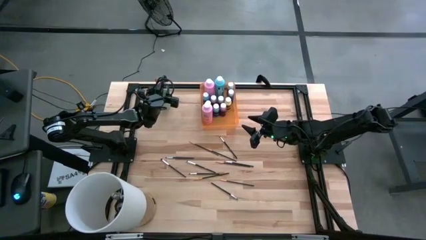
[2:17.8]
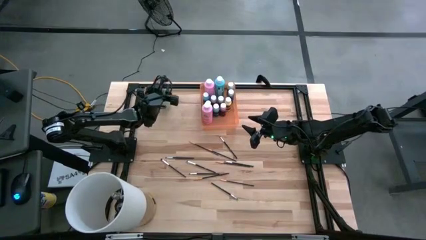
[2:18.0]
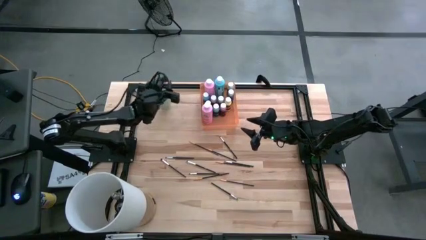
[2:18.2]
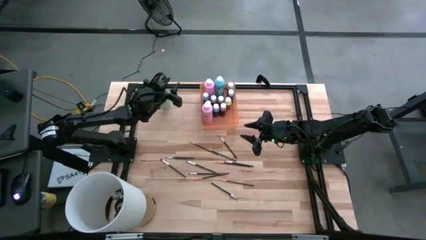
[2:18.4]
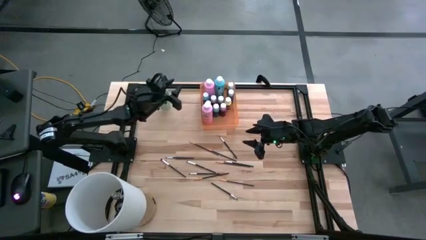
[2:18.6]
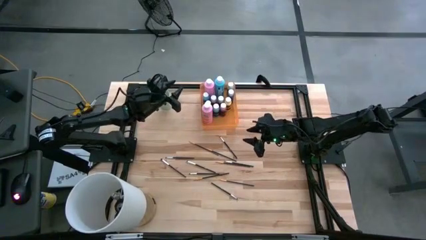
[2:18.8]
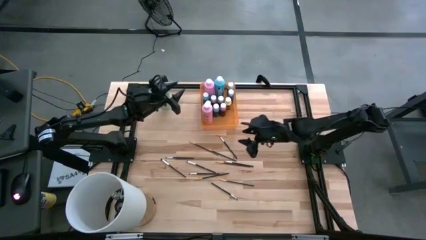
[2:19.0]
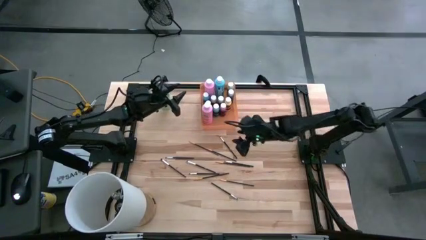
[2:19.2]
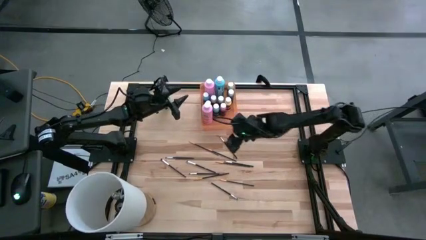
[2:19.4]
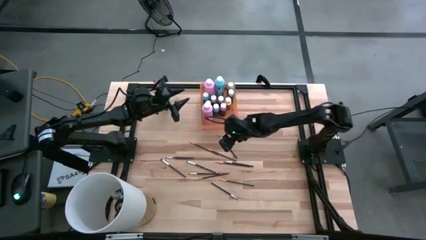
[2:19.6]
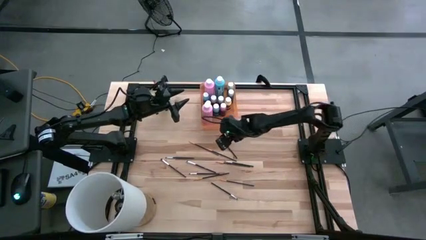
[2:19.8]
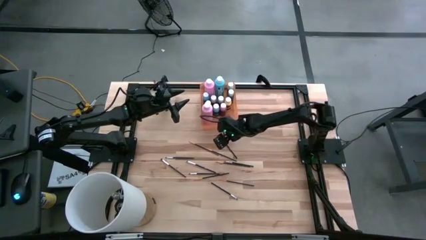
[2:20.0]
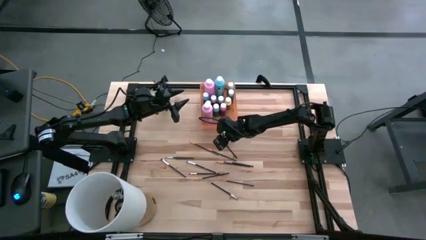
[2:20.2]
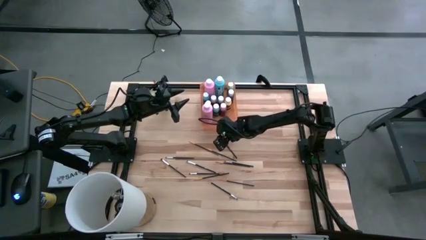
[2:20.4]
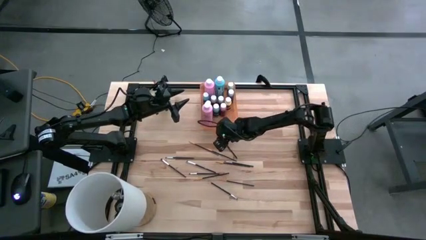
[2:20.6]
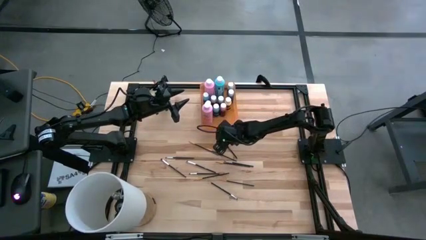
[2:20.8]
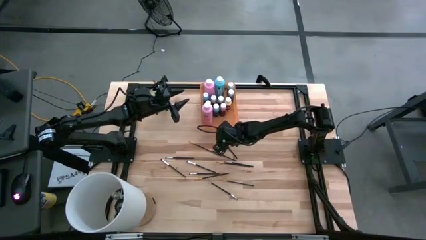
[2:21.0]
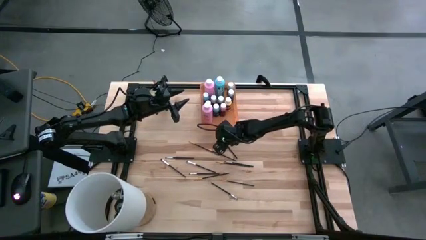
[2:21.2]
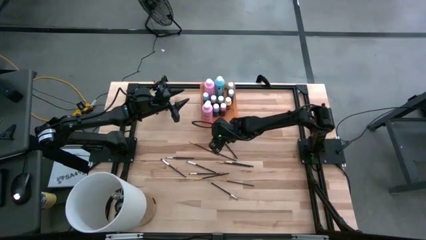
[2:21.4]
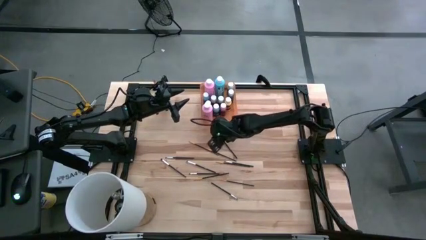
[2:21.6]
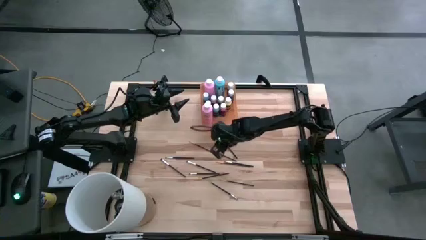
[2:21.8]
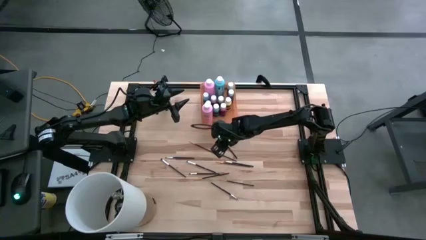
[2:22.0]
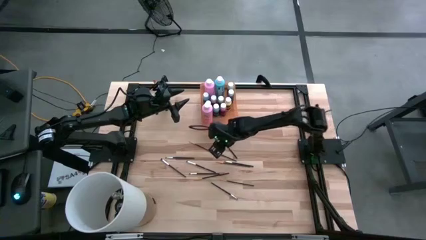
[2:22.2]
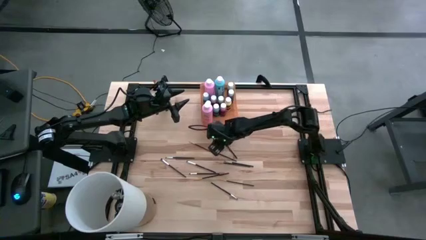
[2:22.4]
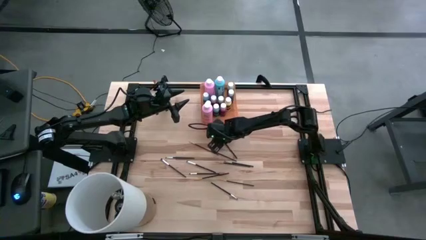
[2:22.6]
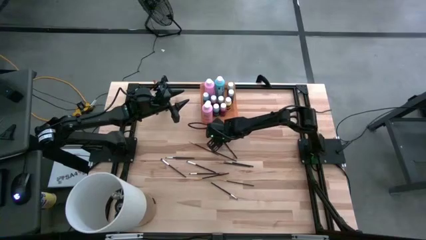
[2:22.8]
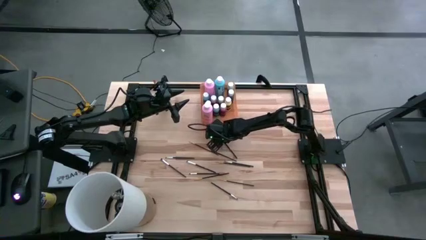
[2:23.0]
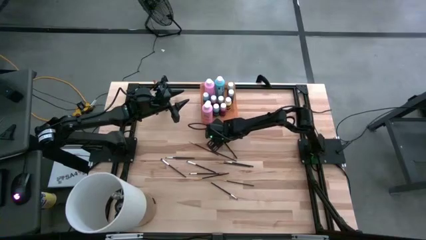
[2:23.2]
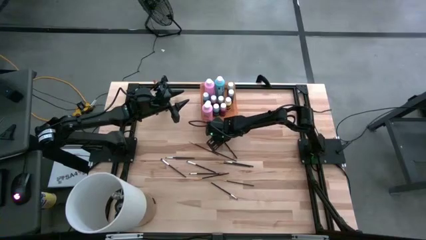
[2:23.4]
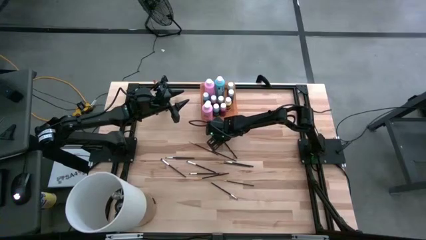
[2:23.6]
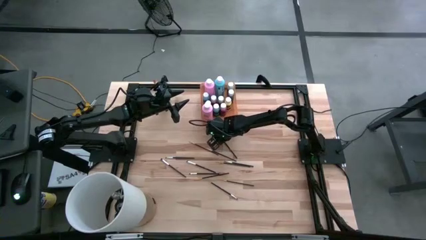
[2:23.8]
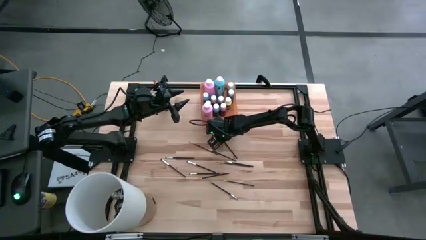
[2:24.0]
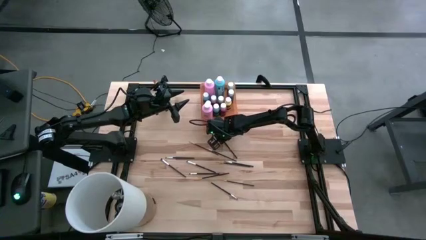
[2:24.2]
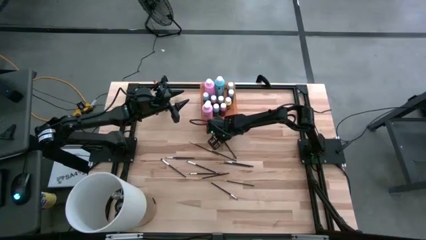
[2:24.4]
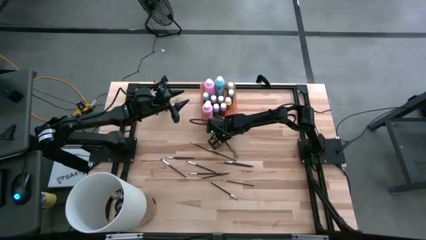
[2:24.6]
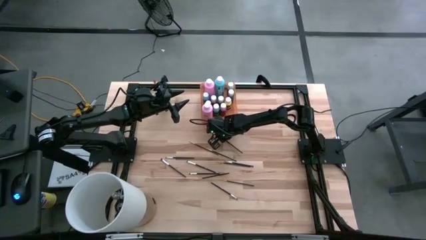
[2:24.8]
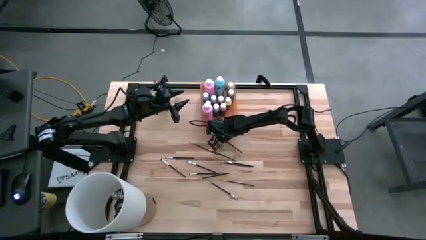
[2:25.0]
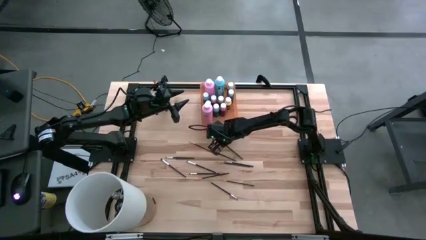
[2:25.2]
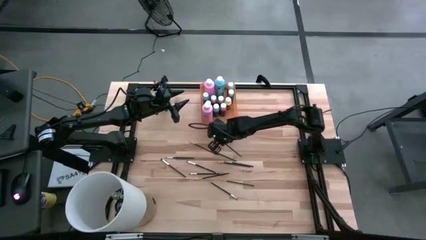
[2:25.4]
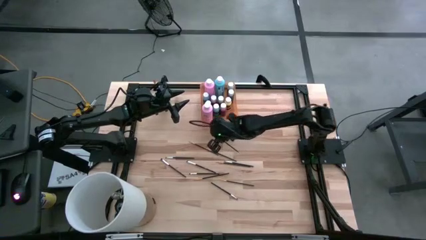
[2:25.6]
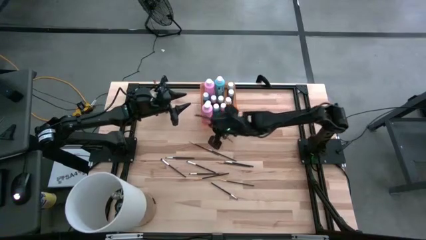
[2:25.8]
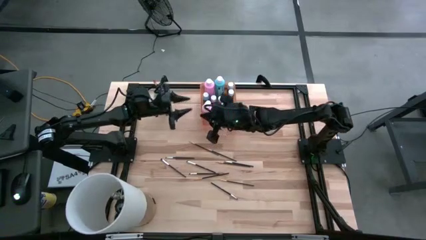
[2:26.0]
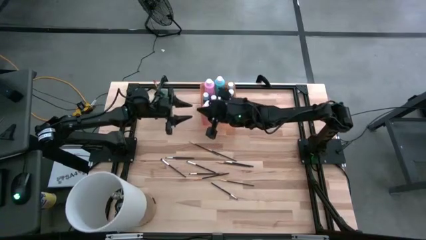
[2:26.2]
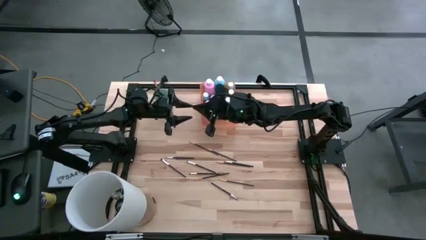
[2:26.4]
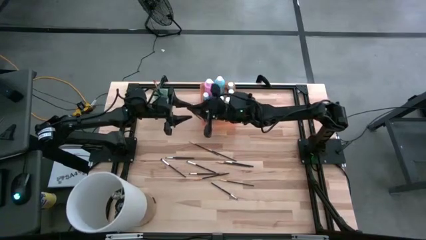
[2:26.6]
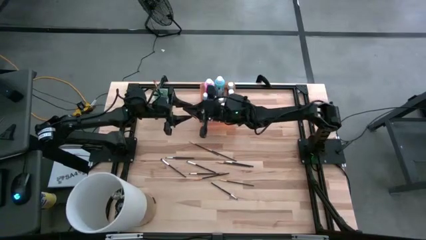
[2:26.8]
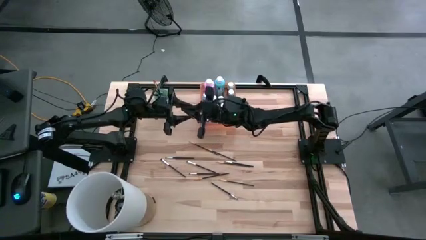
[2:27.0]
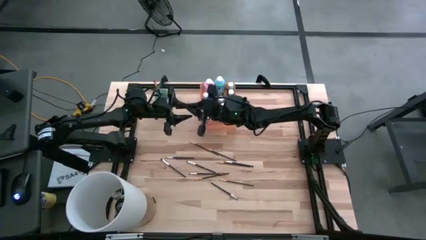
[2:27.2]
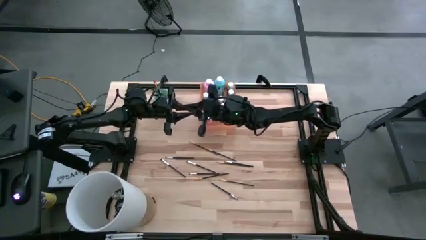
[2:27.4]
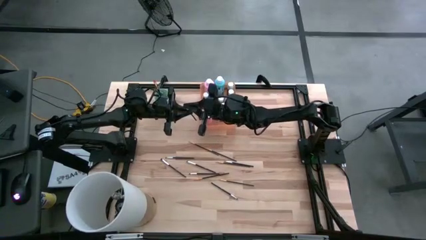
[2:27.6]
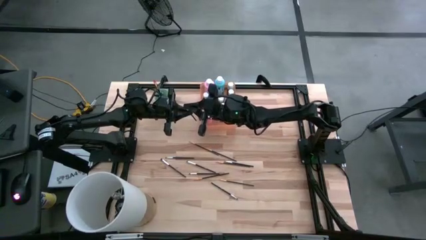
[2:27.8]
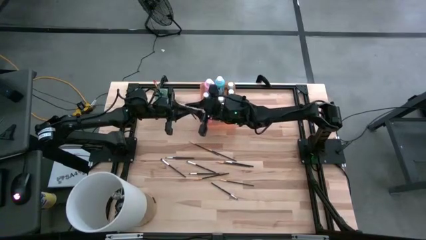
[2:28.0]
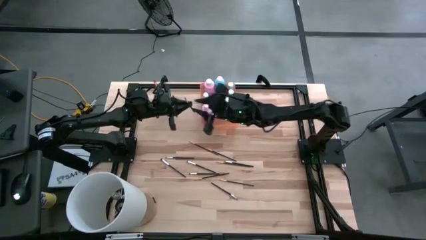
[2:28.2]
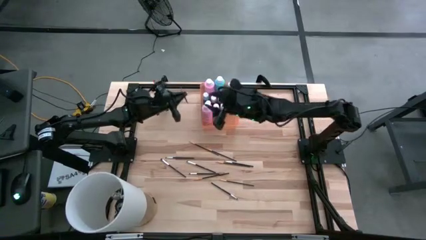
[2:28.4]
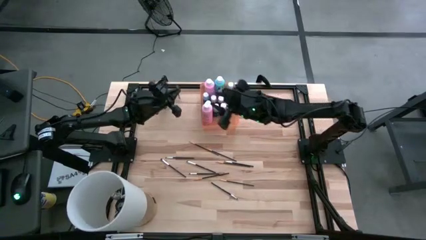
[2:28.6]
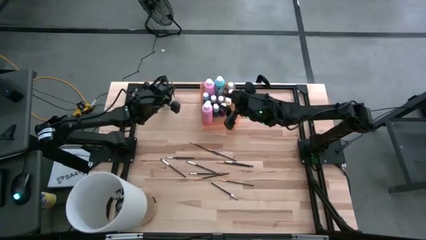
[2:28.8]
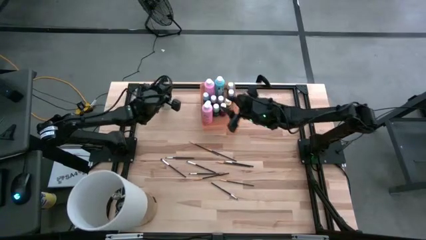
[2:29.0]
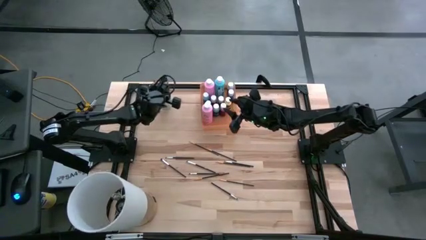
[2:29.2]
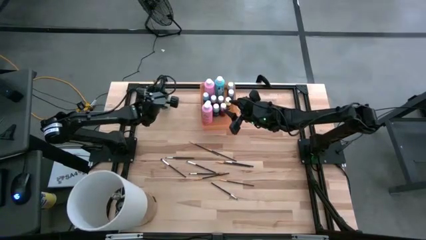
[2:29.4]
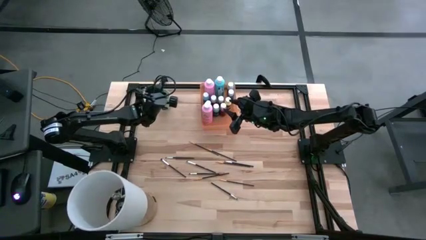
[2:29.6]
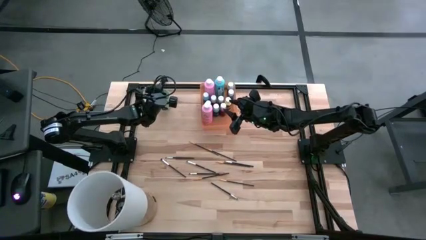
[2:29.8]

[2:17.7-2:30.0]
Task: Pick & Place Paint Supplies
Put the white paintbrush into the cup
